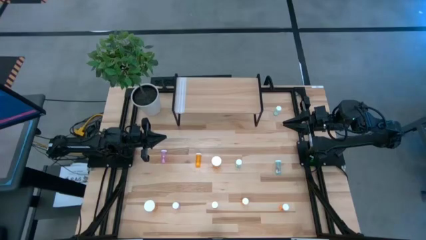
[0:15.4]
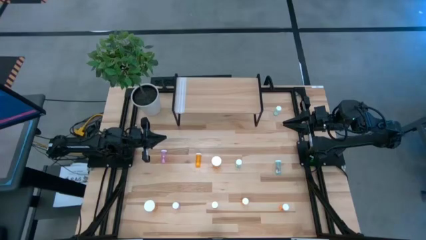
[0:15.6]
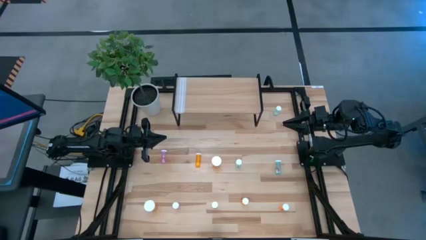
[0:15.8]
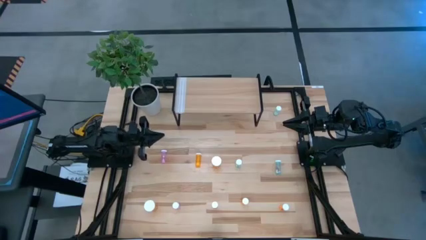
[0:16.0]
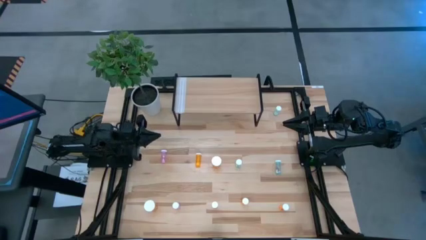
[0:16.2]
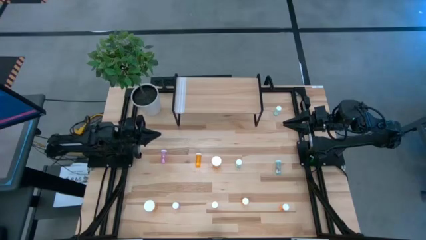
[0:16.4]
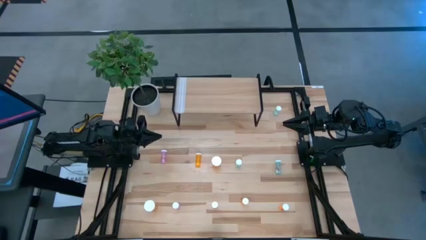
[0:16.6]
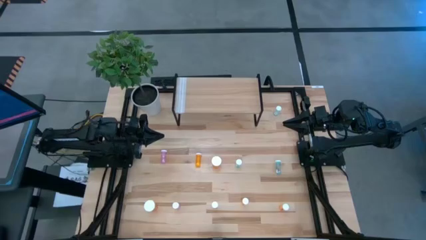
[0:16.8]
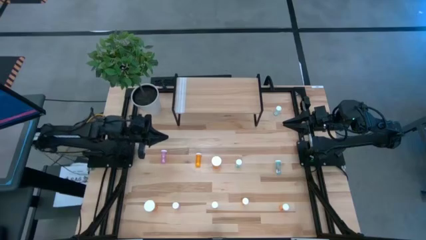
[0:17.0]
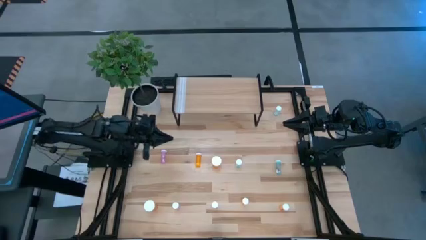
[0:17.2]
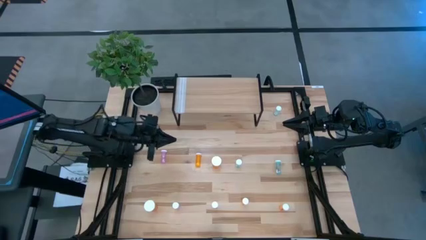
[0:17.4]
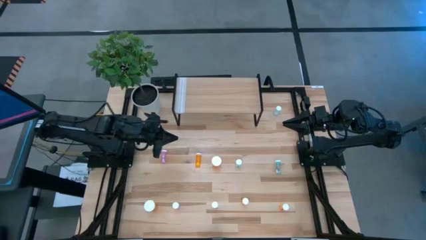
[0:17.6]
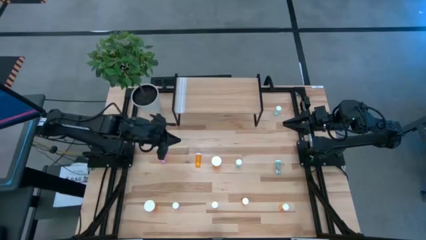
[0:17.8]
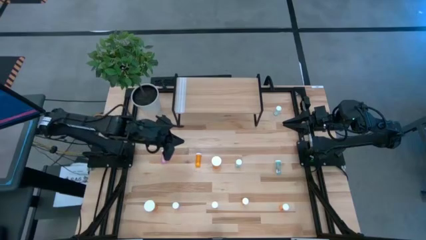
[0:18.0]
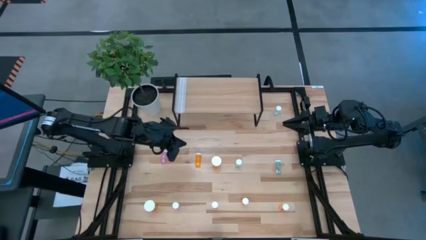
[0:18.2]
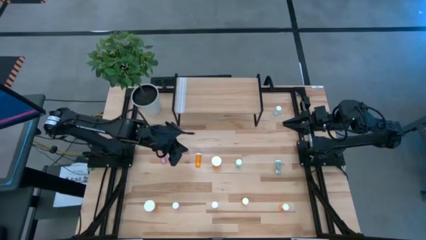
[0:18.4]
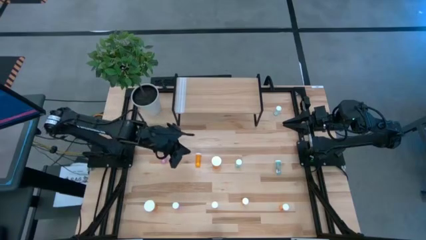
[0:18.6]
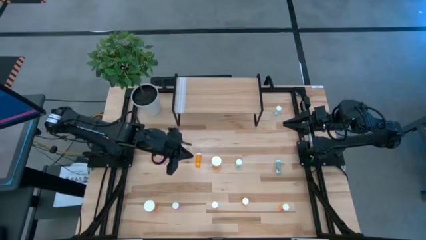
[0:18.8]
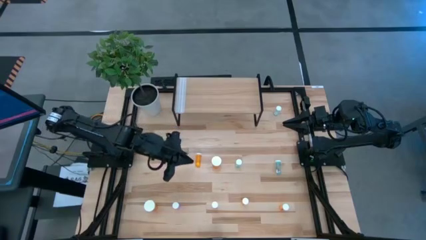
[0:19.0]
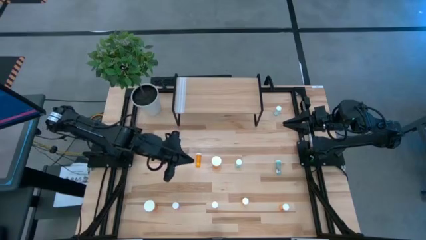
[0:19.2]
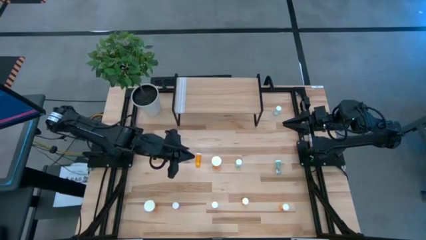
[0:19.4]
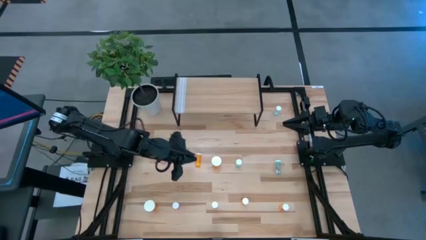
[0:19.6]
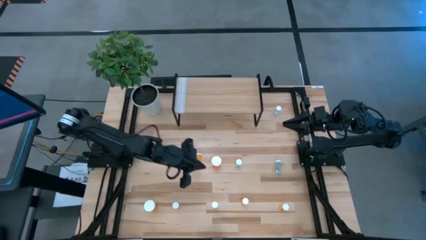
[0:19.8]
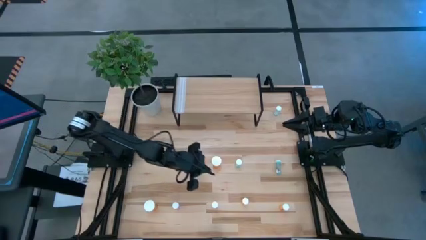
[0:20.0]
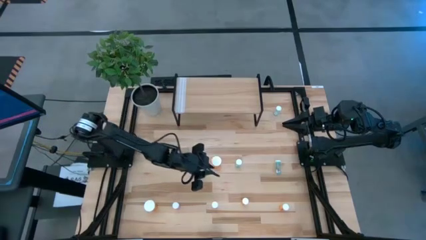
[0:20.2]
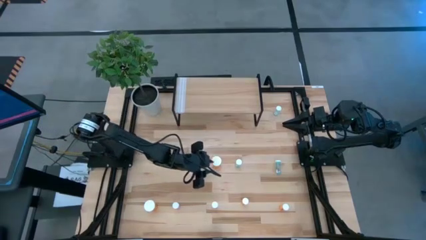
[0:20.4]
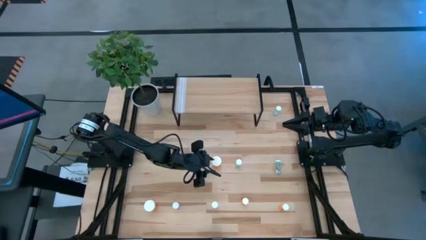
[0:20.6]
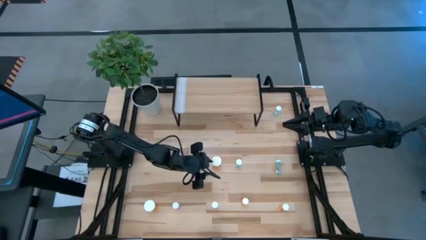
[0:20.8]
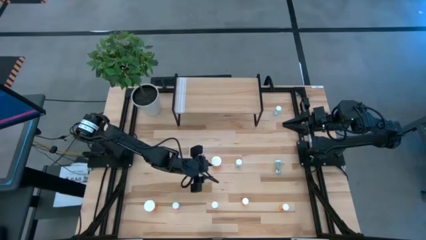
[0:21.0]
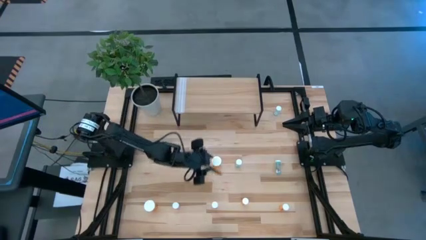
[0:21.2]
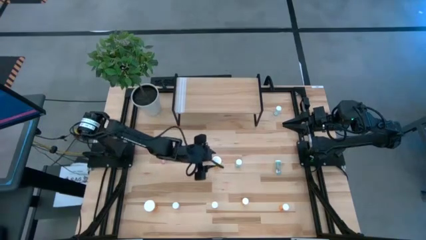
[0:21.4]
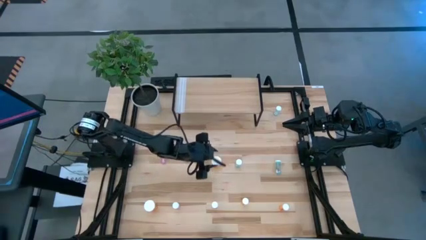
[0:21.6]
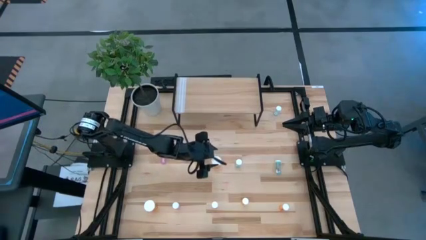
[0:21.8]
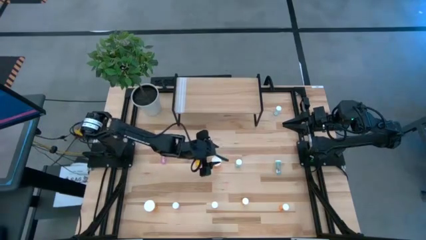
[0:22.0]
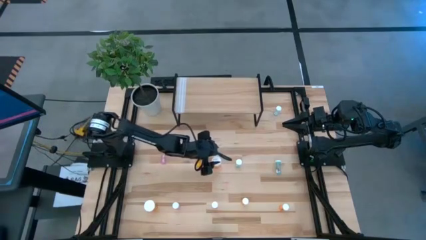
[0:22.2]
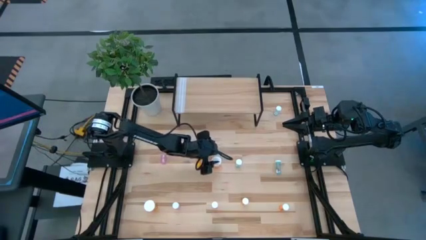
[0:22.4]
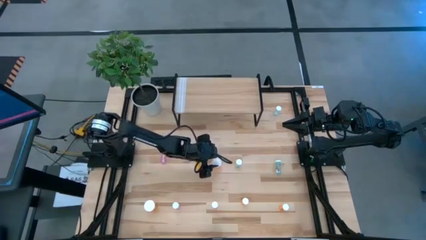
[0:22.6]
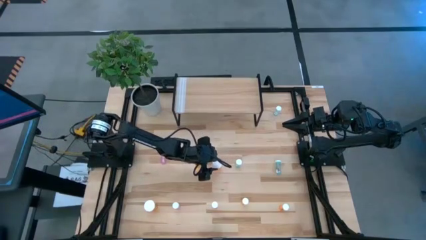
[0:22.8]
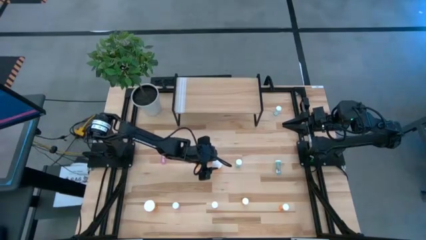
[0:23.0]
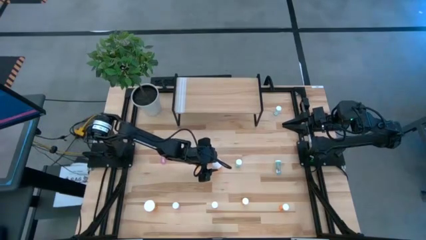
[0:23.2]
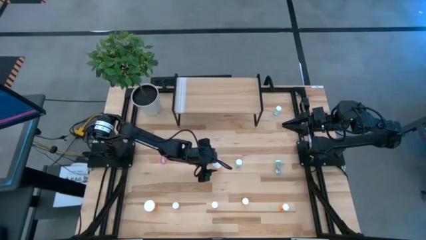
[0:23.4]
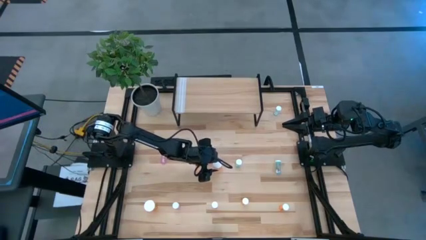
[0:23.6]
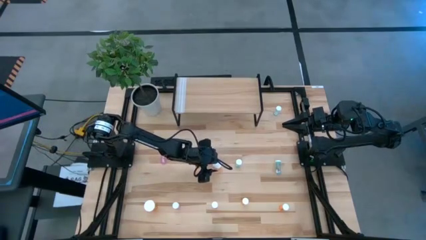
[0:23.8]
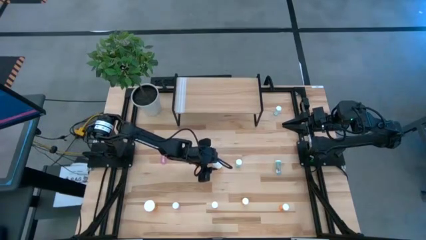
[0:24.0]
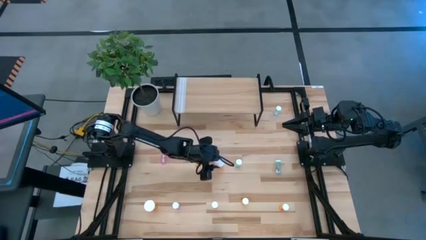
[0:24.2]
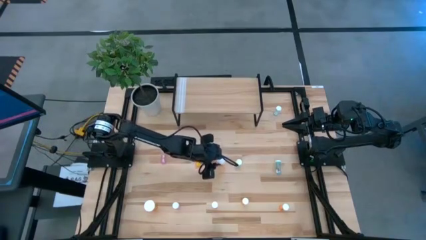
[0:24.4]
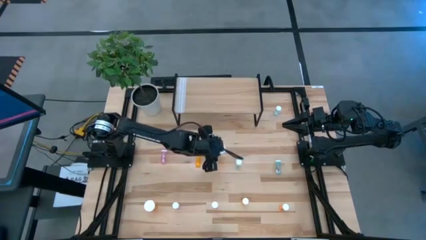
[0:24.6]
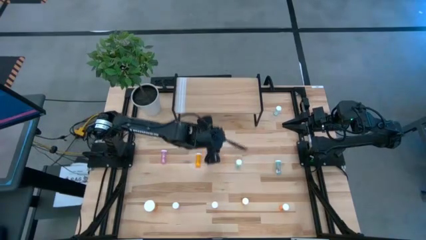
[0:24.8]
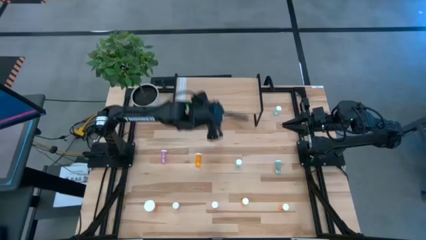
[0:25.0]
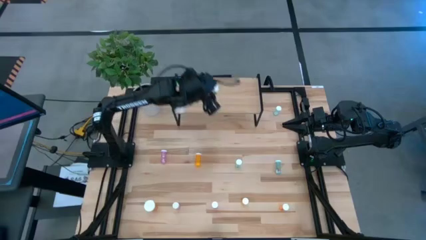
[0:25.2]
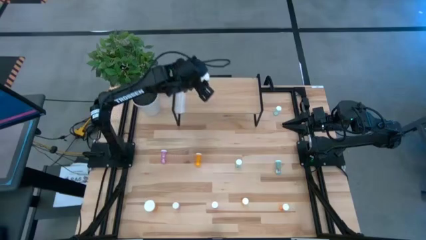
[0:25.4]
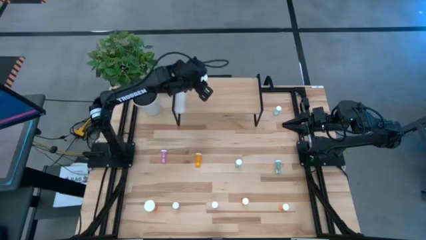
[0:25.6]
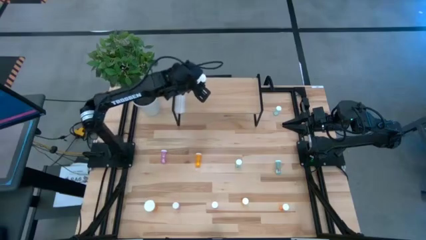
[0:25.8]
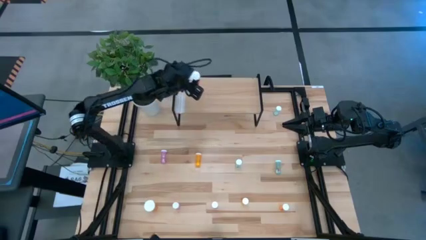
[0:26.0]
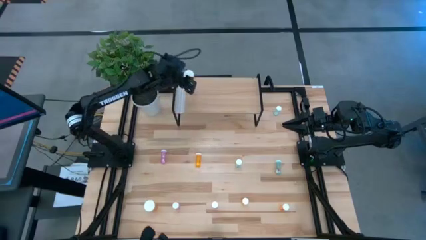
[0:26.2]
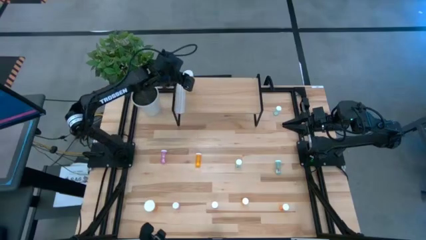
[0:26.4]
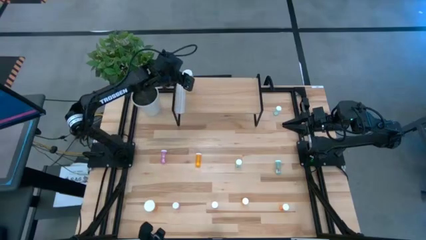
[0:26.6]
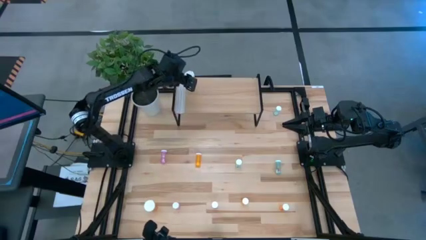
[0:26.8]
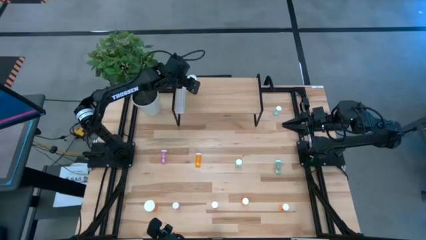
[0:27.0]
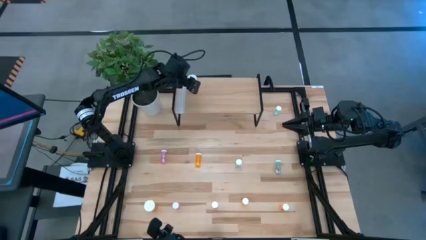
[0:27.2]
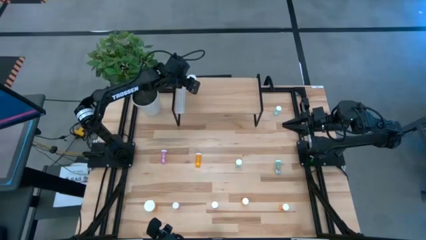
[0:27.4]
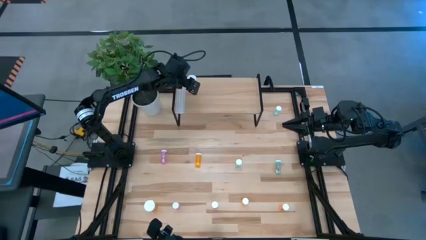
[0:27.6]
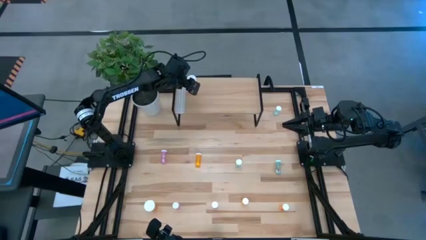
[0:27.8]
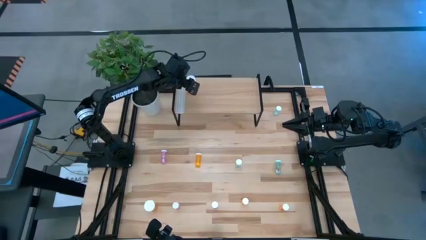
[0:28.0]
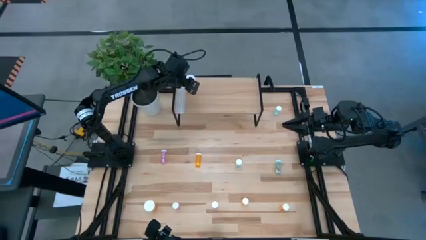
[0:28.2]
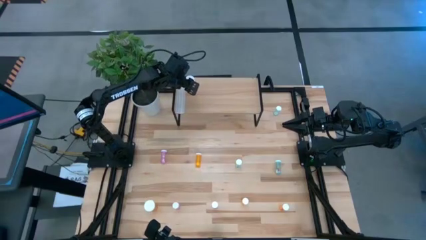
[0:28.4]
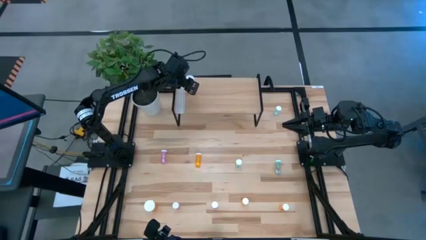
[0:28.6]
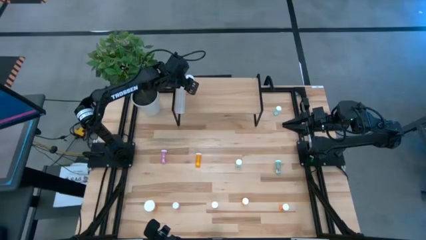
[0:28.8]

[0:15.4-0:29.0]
Task: Pick and place medicine bottles onto shelf by color
Put the top large orange pill bottle on the shelf
